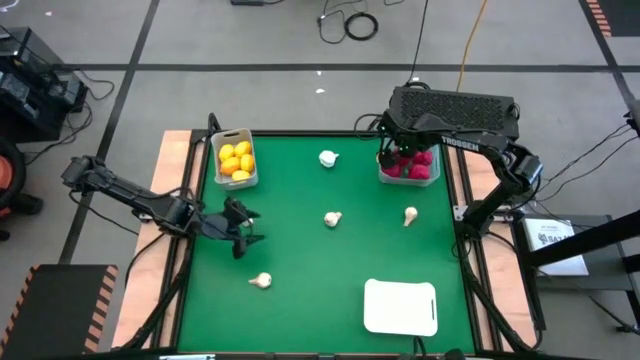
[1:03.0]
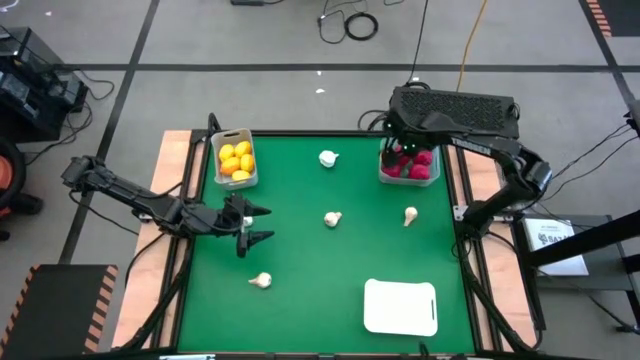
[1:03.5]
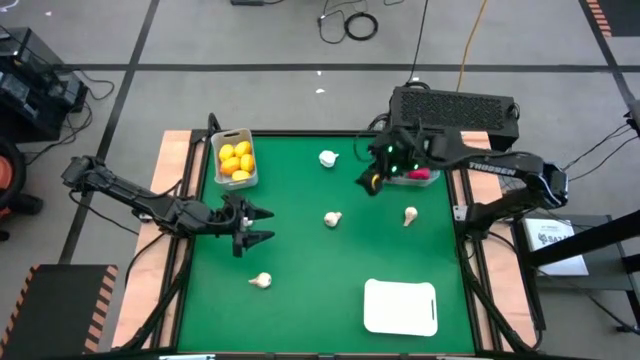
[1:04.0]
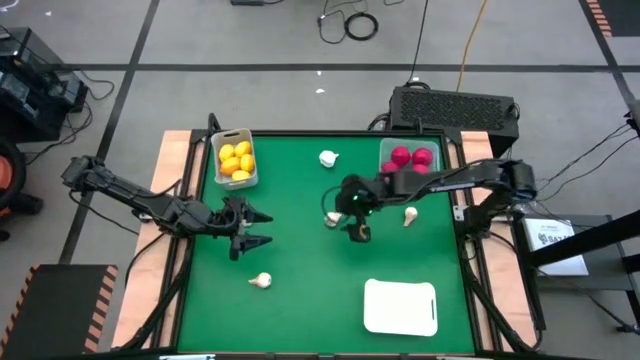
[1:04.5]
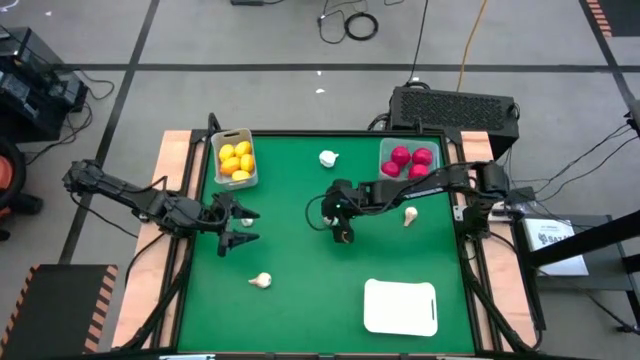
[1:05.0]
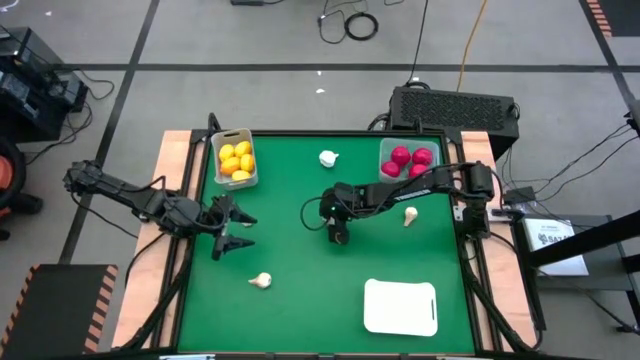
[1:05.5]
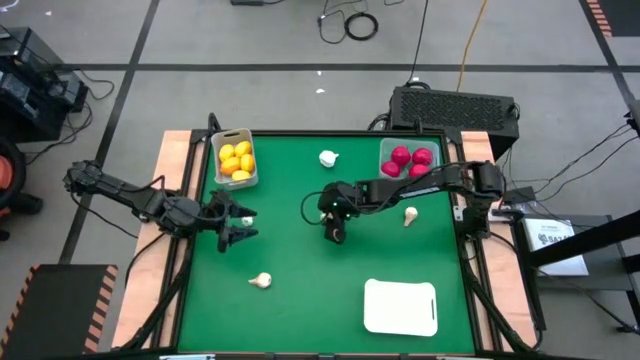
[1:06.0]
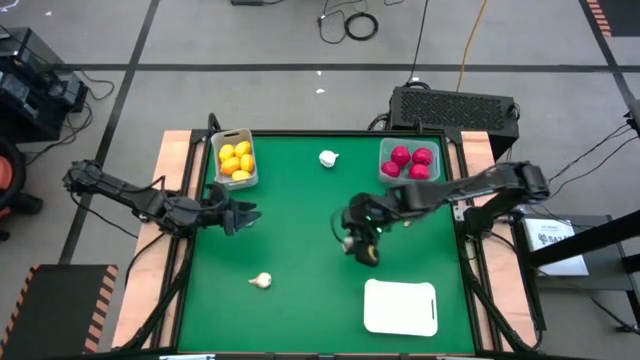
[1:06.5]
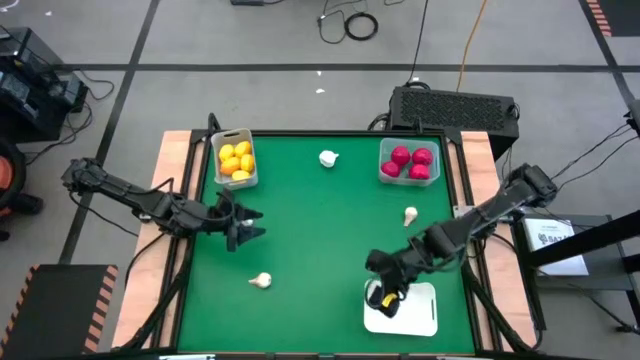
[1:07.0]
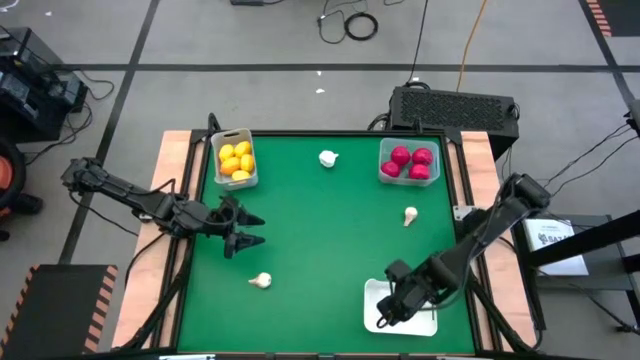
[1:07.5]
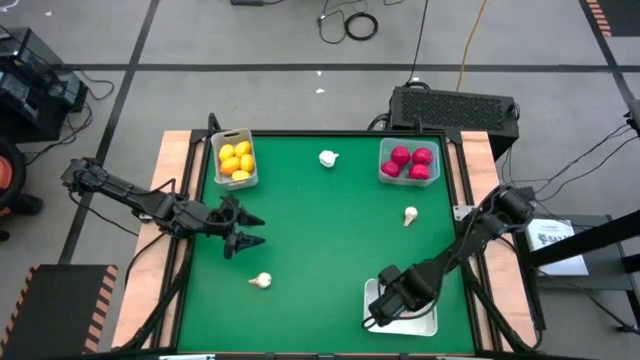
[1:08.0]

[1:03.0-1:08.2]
Task: Sort produce into baskets
Put the white garlic in the white bin

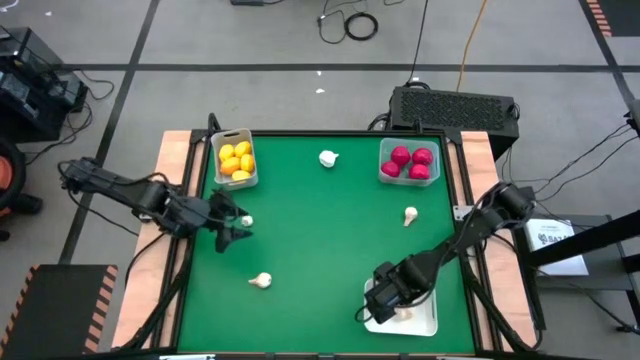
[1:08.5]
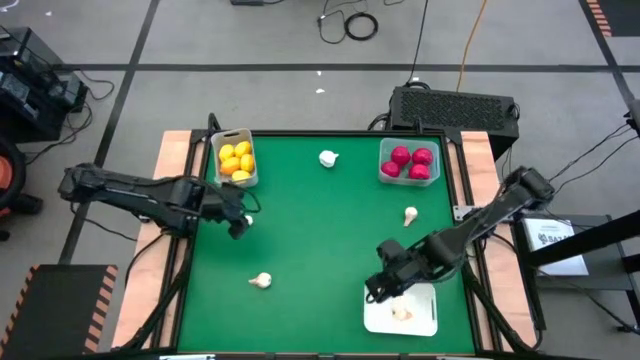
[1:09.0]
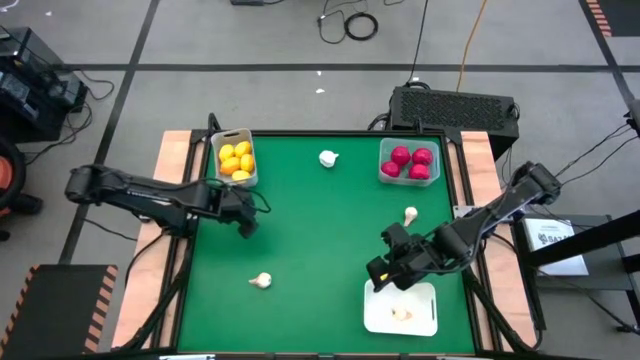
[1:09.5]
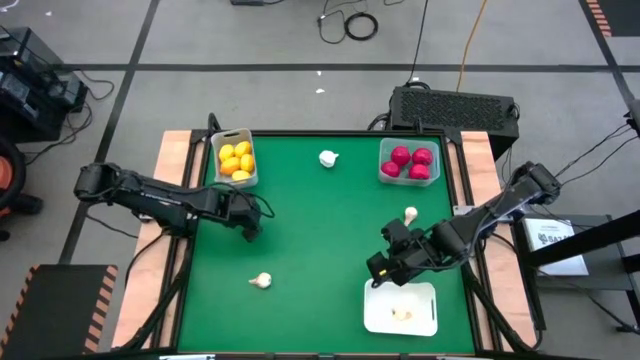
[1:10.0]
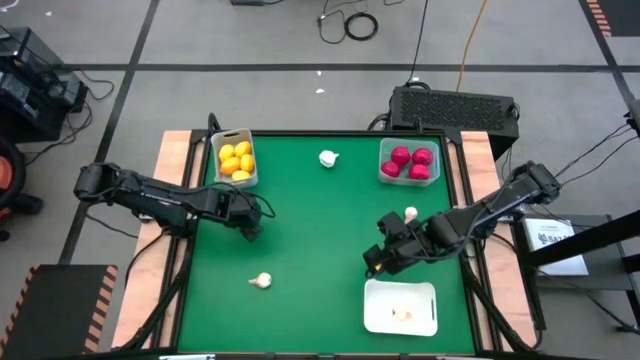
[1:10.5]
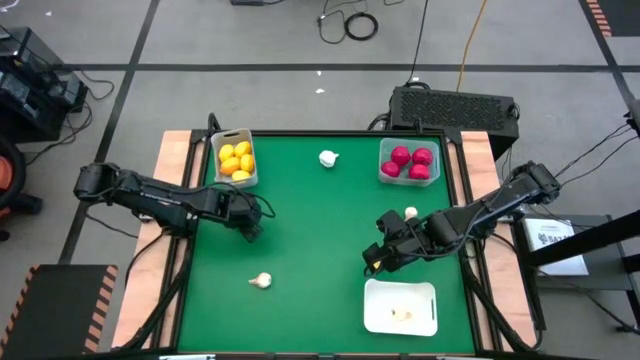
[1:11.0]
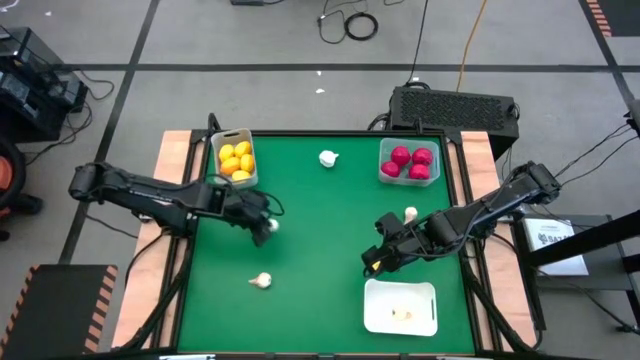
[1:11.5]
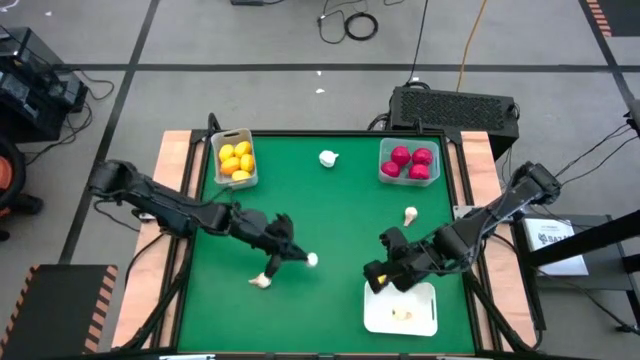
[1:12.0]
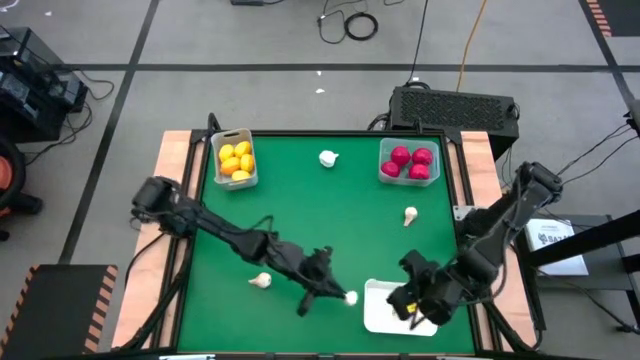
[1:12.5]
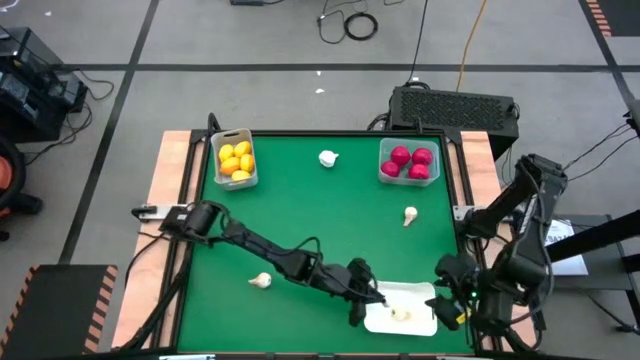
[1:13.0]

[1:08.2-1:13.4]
Put the white garlic in the white bin

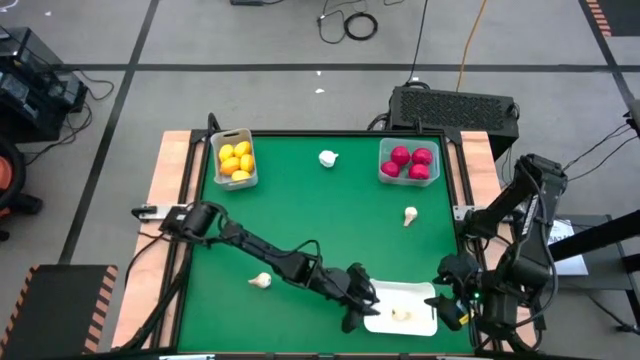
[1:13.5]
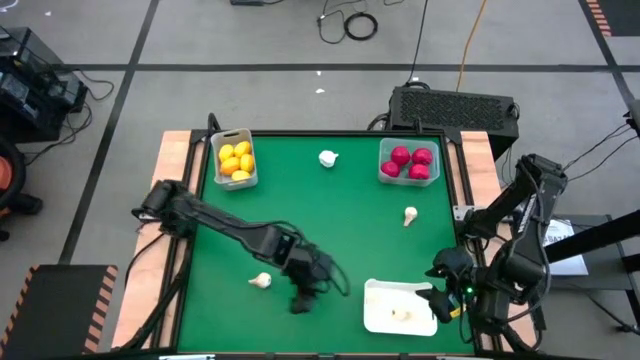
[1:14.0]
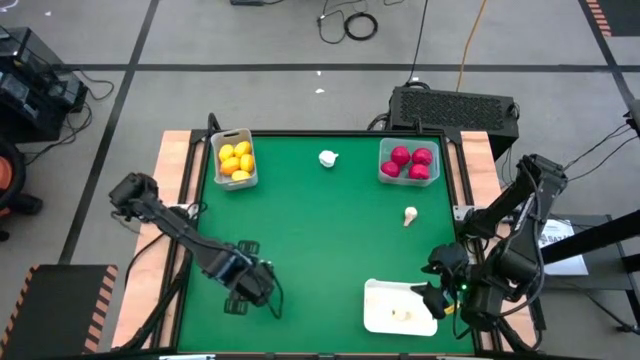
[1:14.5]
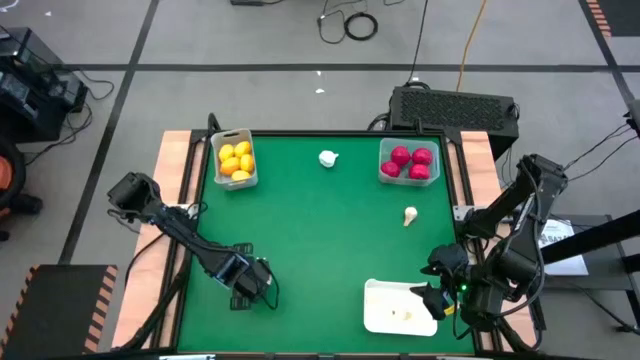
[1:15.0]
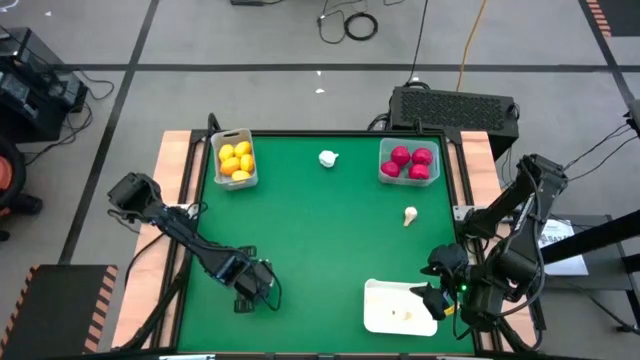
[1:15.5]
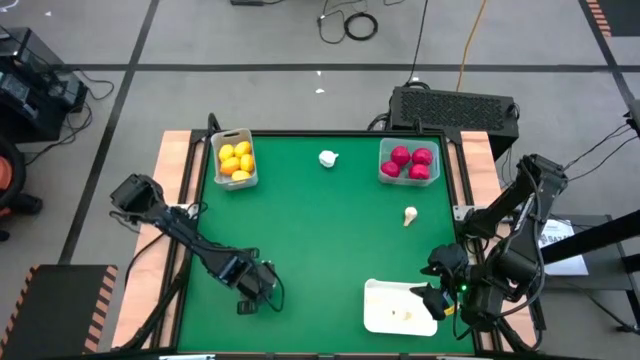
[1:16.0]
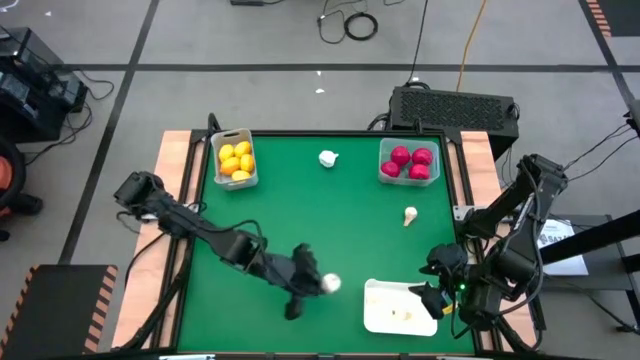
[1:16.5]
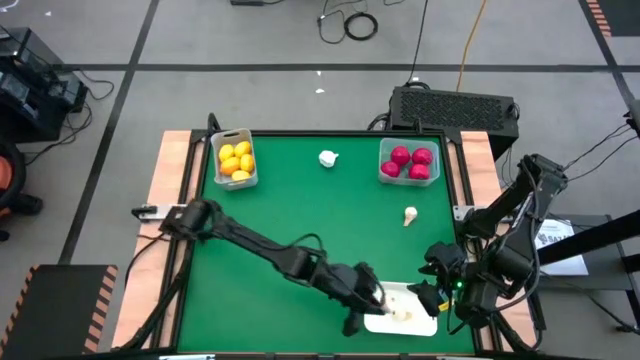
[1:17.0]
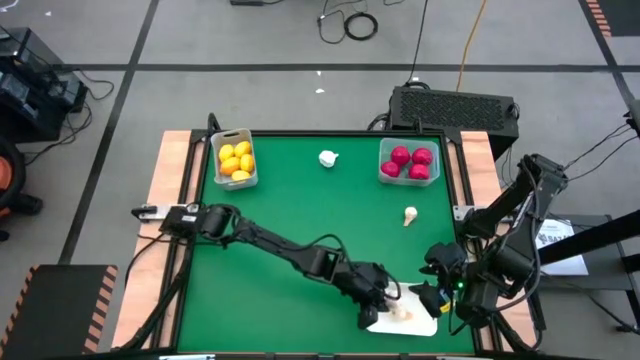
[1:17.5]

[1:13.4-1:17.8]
Put the white garlic in the white bin

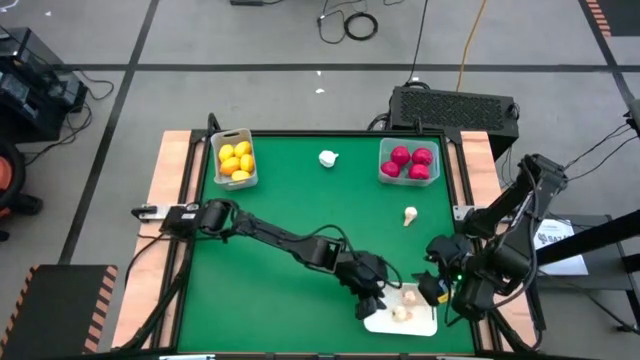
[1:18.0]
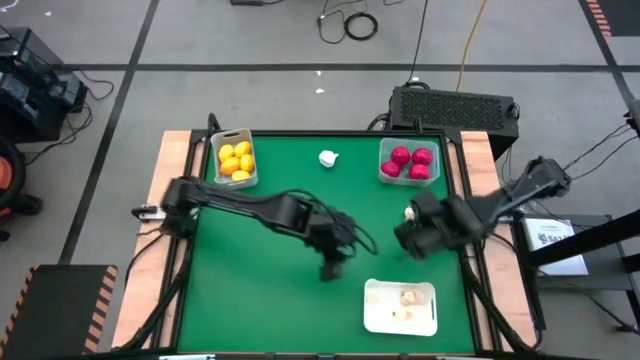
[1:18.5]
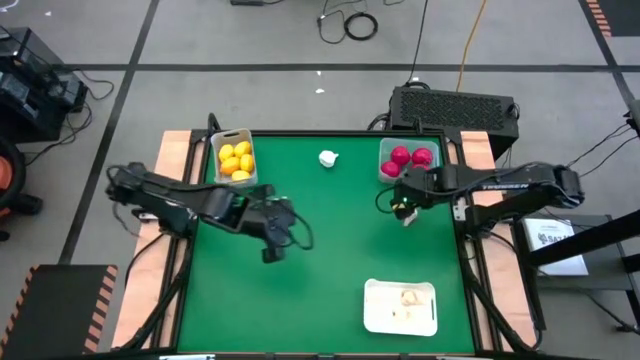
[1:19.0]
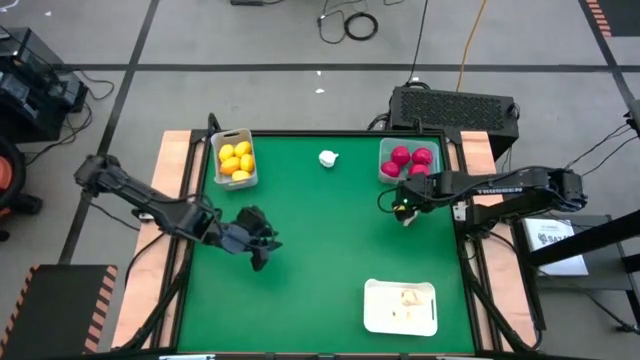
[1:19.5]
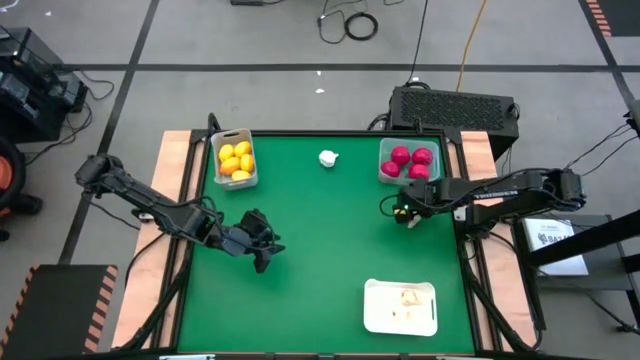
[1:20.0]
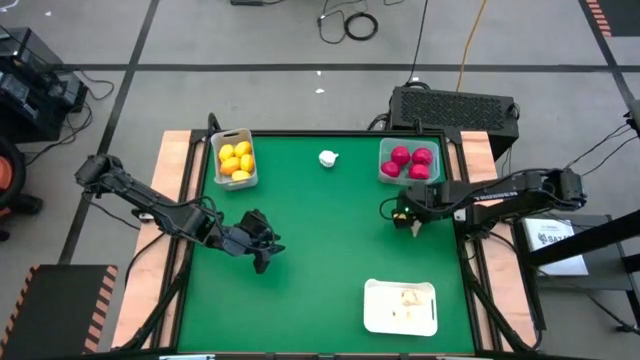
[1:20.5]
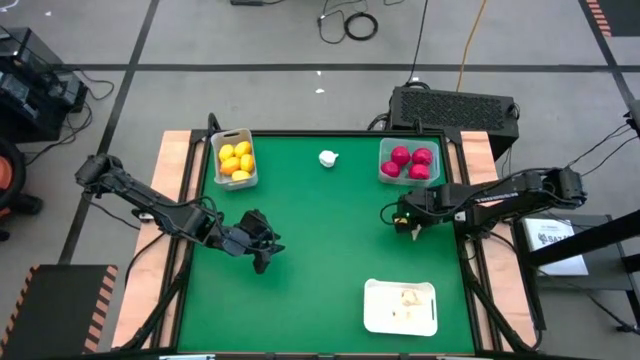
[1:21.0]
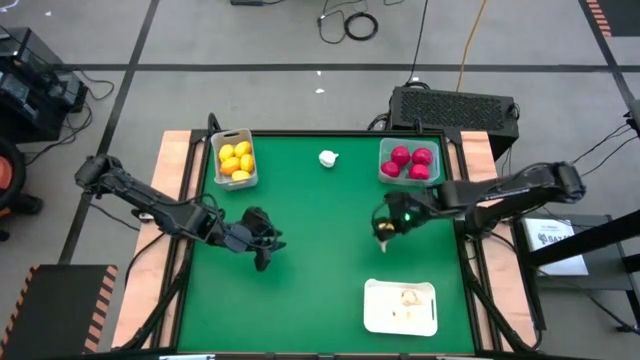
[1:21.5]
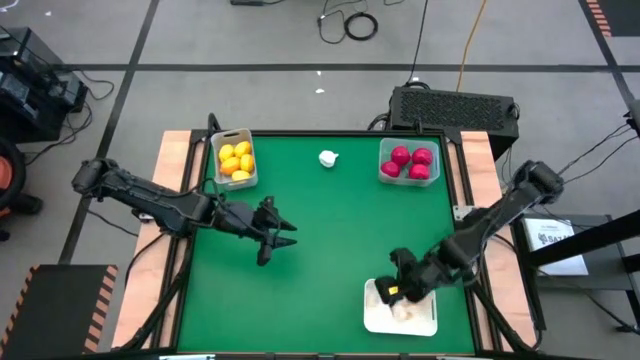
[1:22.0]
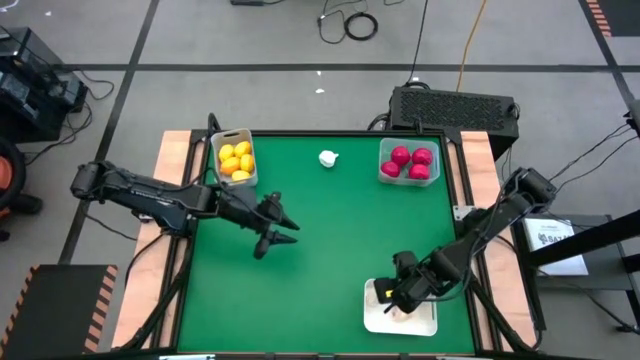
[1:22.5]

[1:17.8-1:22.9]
Put the white garlic in the white bin

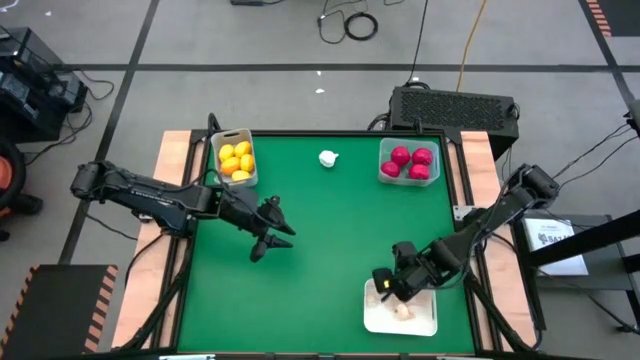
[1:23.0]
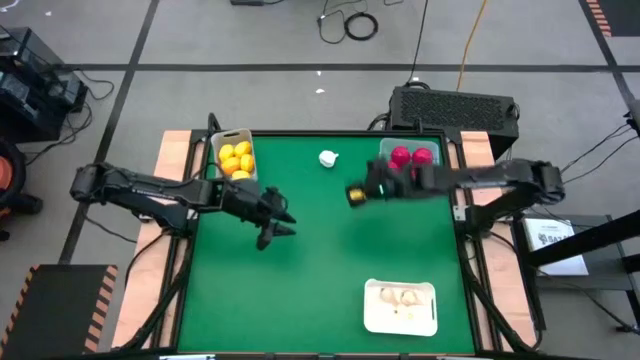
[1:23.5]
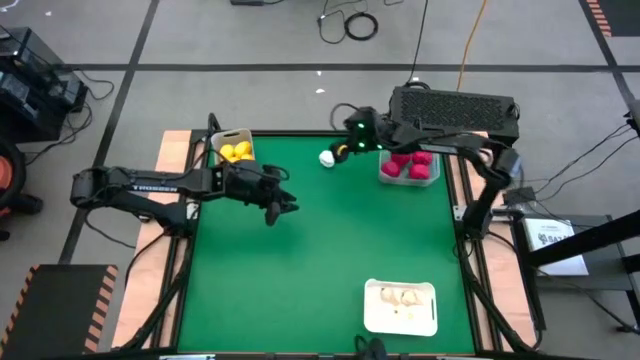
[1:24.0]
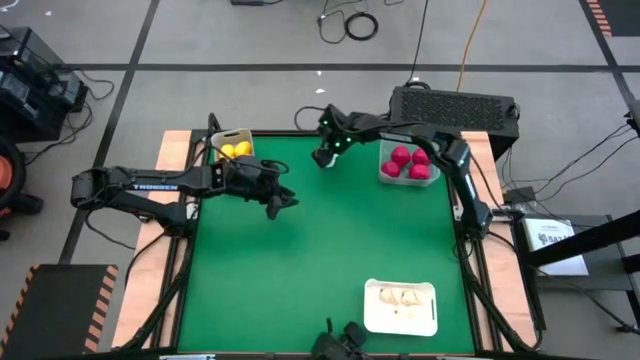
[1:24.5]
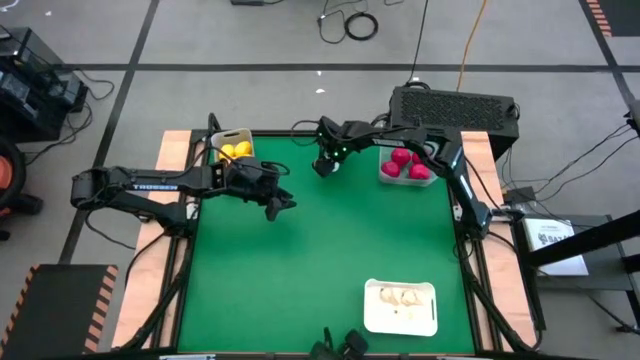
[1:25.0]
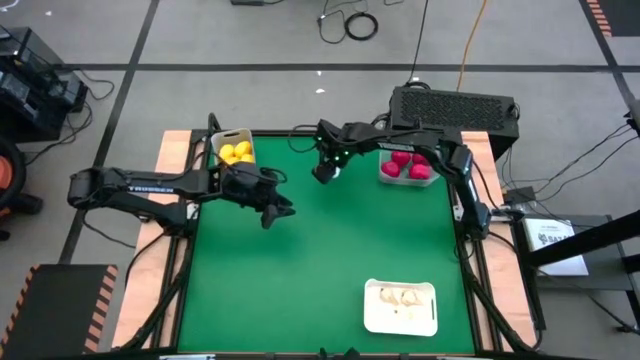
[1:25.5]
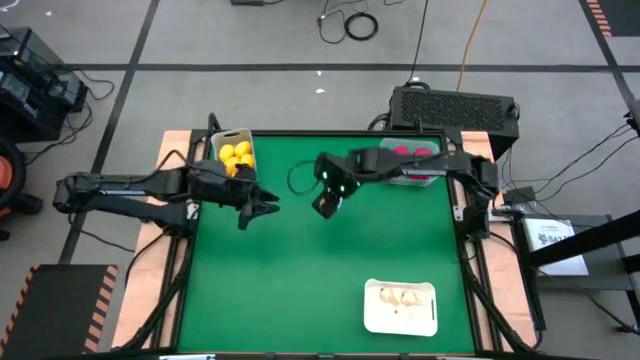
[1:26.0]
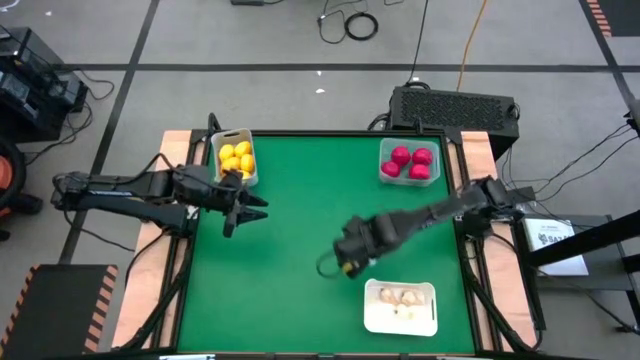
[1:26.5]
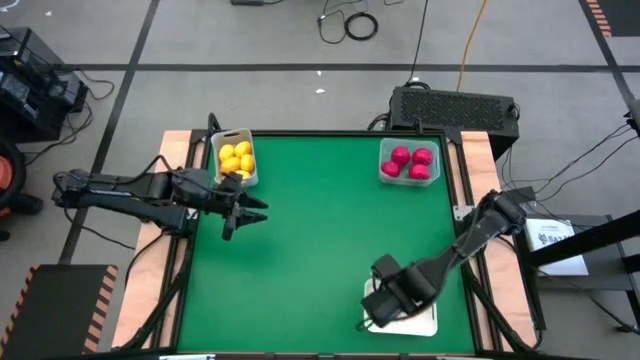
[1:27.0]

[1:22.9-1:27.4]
Put the white garlic in the white bin
